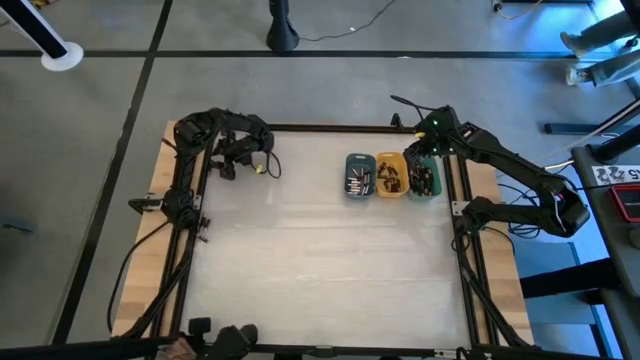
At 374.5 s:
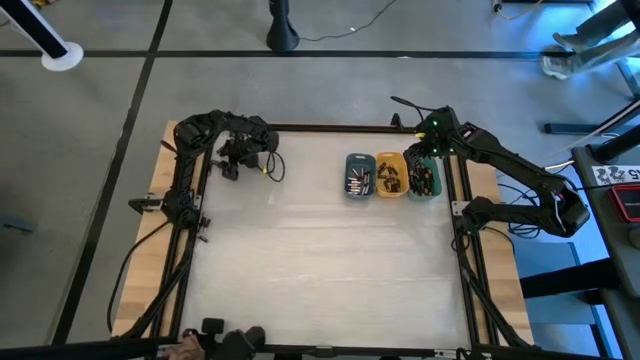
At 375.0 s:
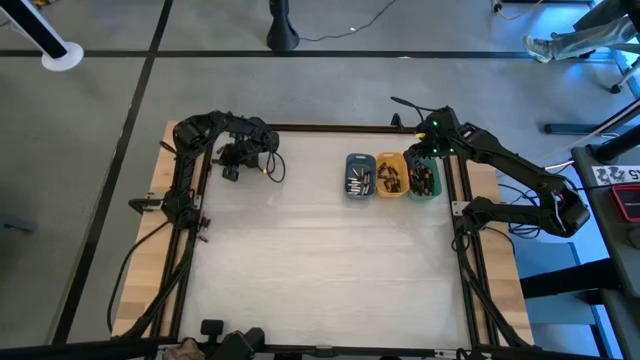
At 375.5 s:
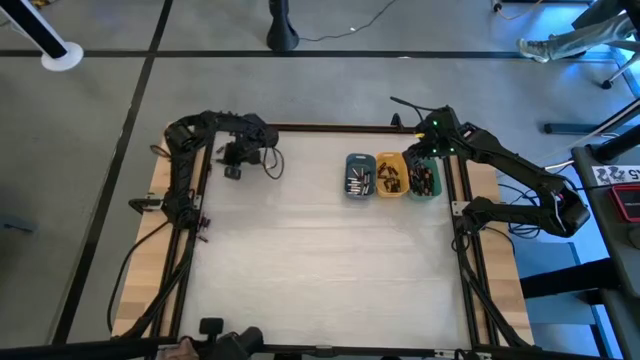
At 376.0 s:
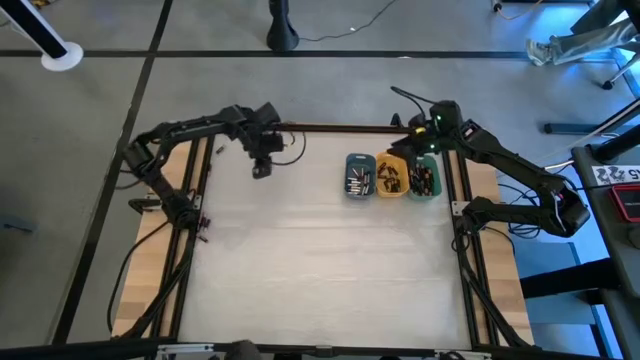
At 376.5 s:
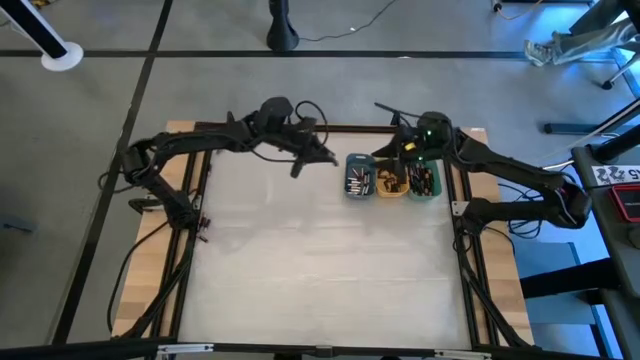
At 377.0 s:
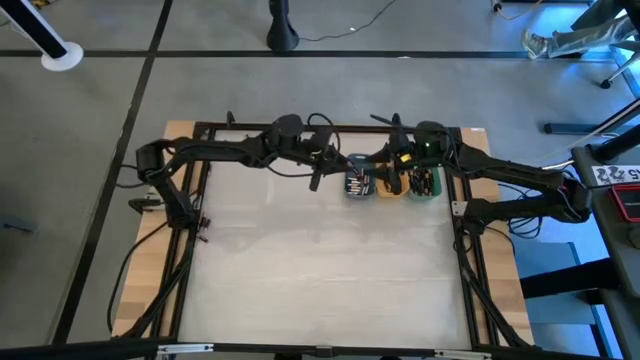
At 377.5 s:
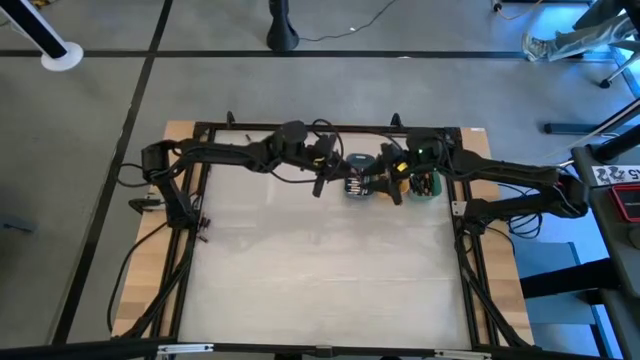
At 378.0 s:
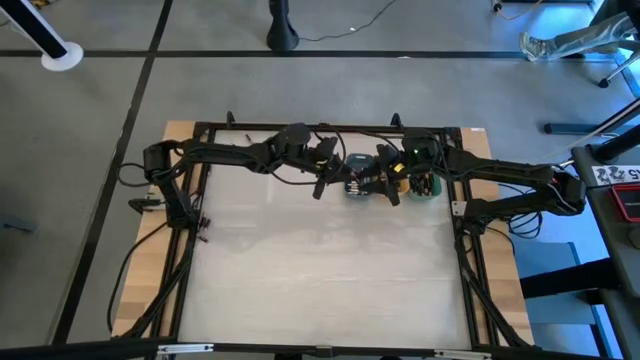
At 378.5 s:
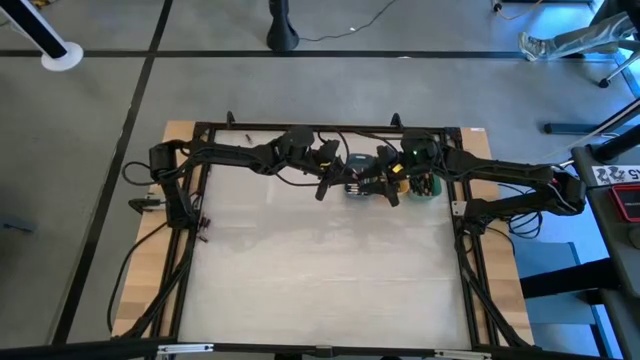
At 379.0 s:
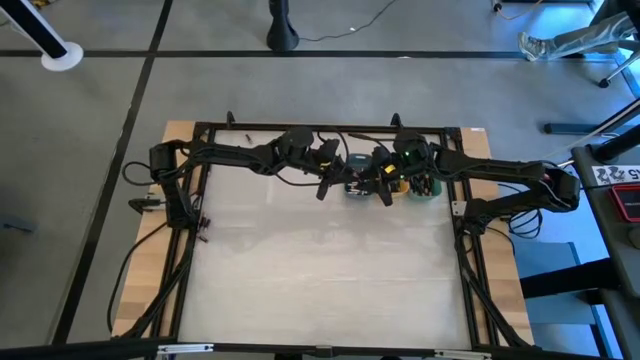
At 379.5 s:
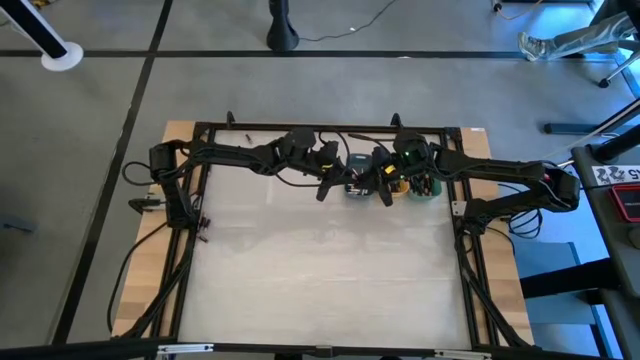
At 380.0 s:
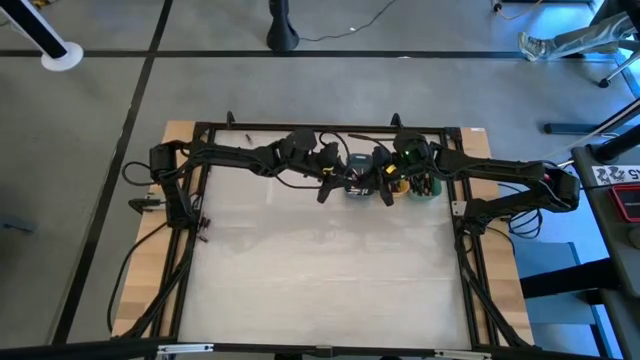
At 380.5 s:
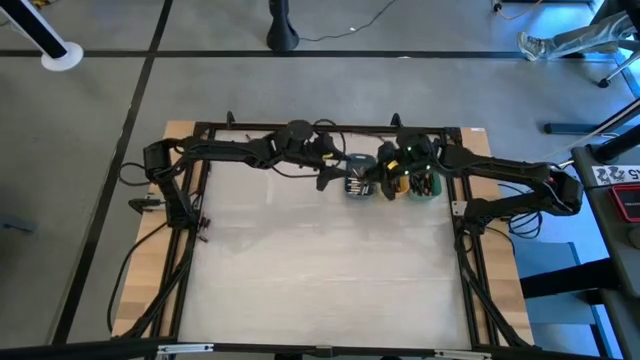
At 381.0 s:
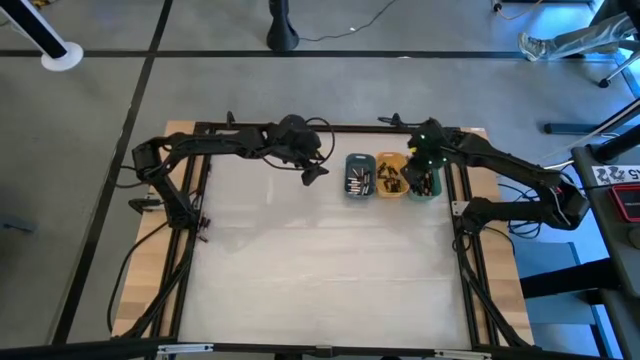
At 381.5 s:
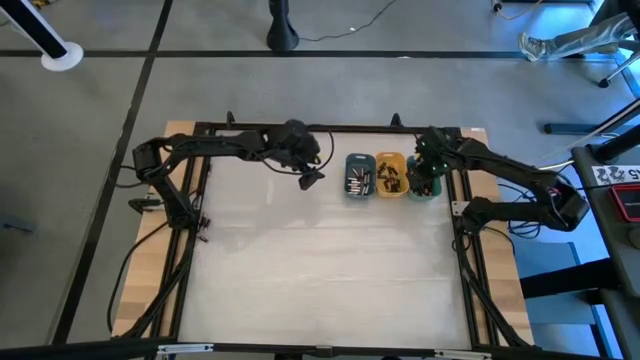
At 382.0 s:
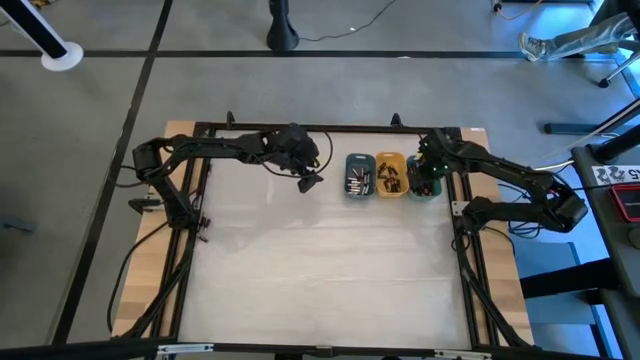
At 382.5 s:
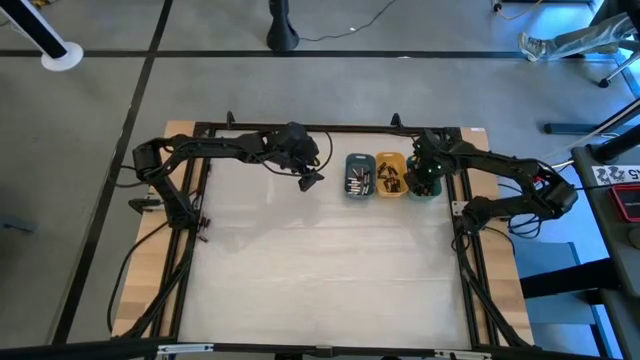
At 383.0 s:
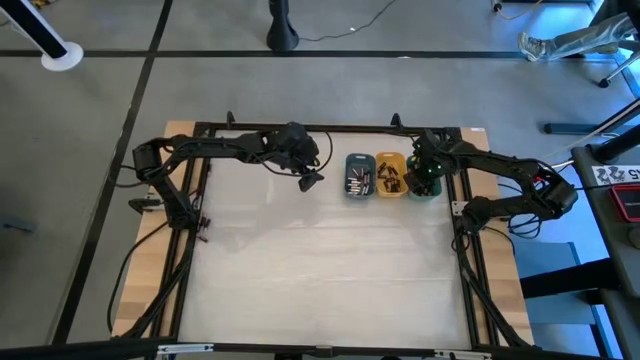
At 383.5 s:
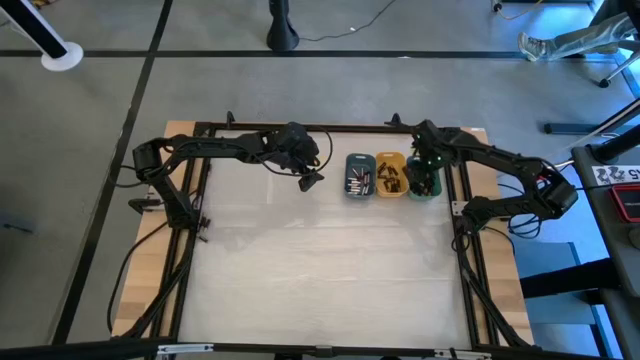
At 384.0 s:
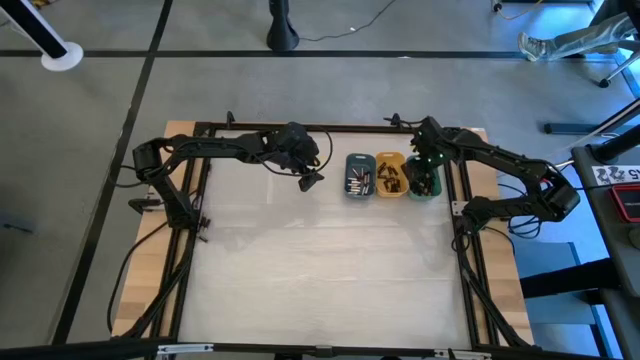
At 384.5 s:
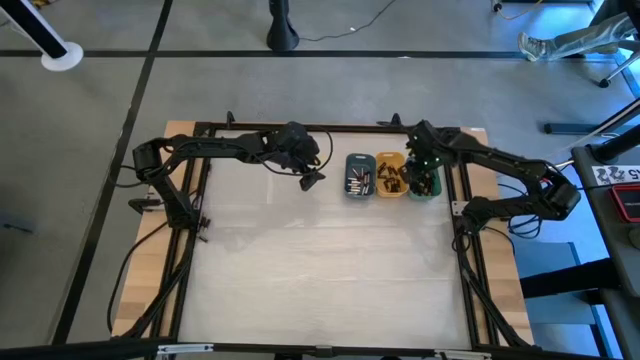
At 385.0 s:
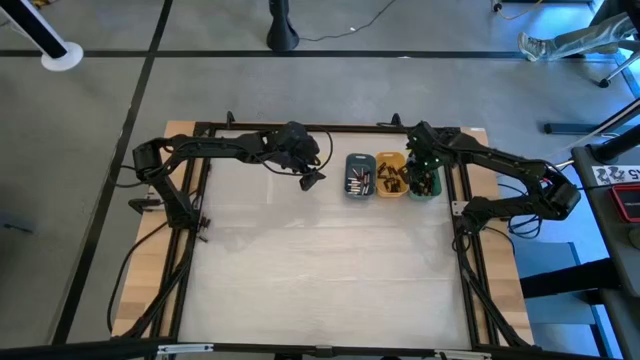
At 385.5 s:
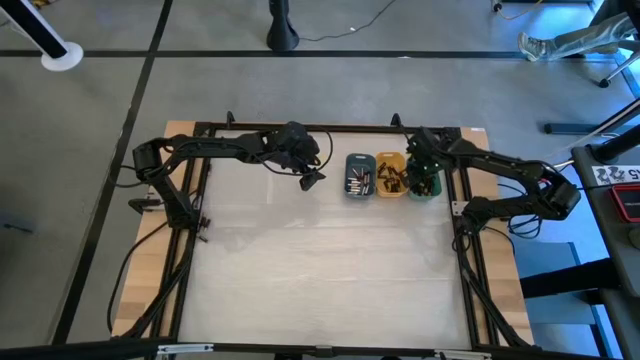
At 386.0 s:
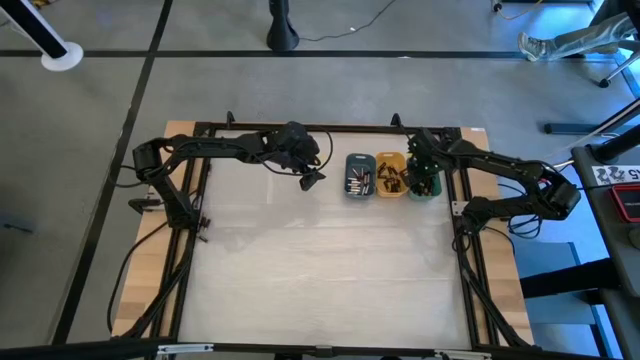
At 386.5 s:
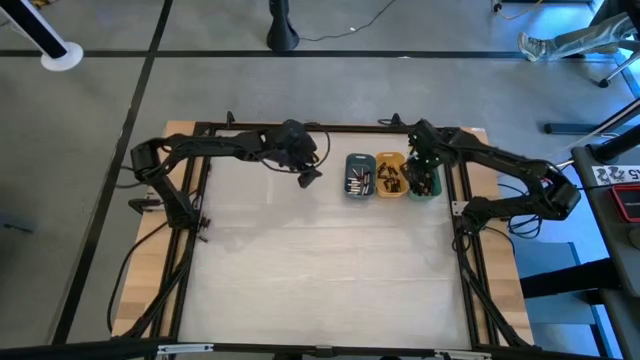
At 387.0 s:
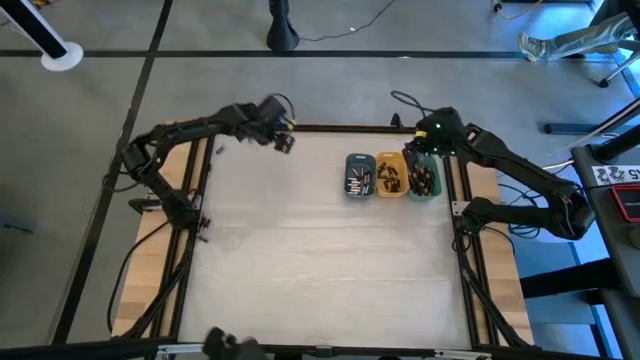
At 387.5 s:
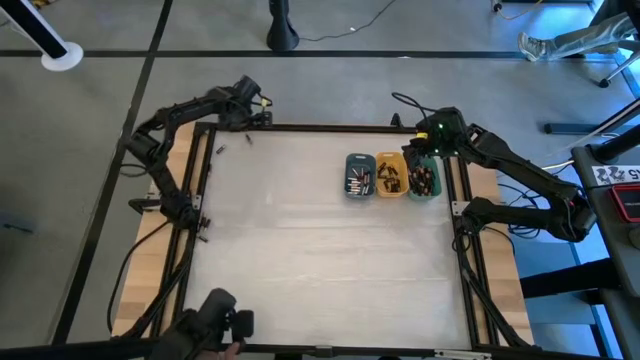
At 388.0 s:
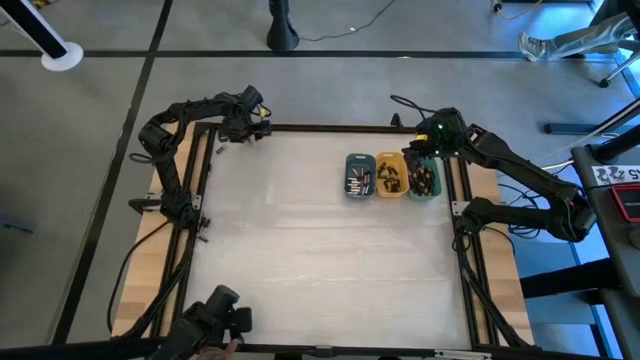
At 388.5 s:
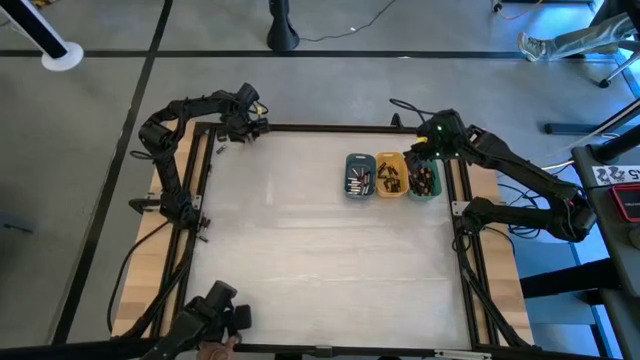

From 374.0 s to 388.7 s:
Task: Sort batteries
Put the black battery into the green bin

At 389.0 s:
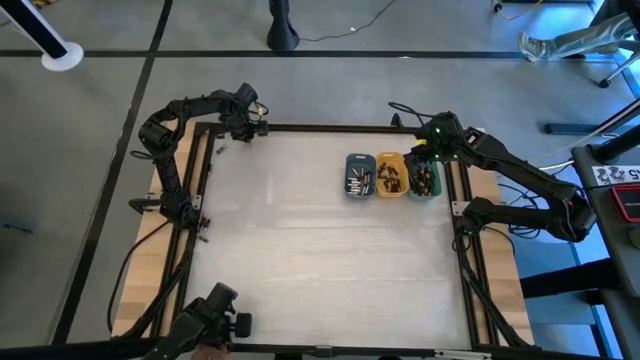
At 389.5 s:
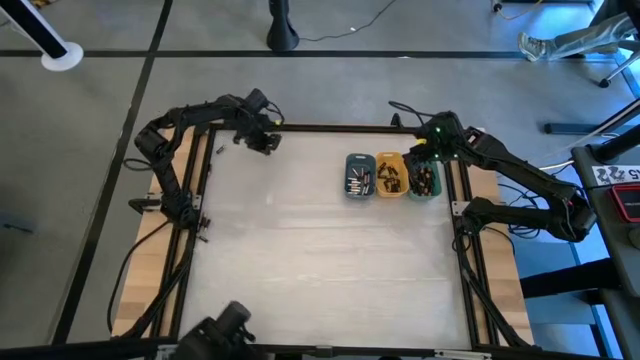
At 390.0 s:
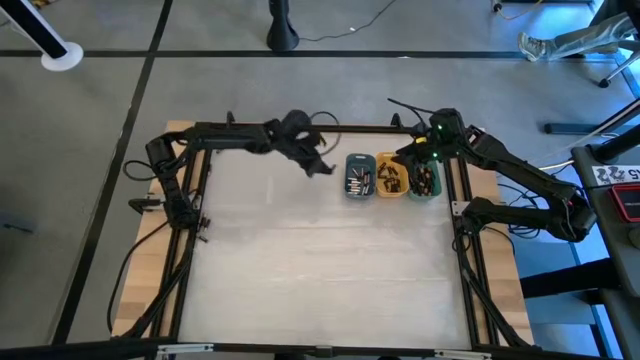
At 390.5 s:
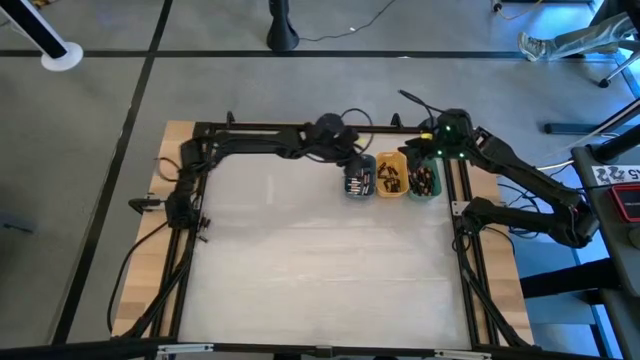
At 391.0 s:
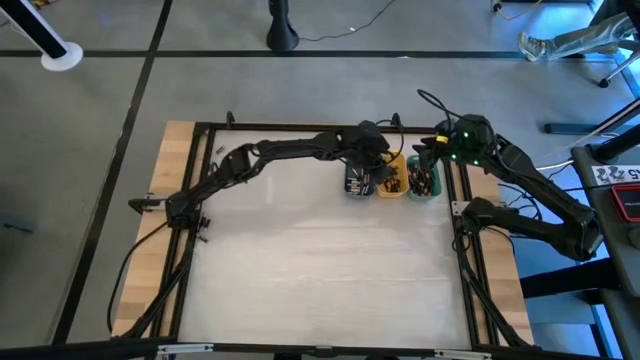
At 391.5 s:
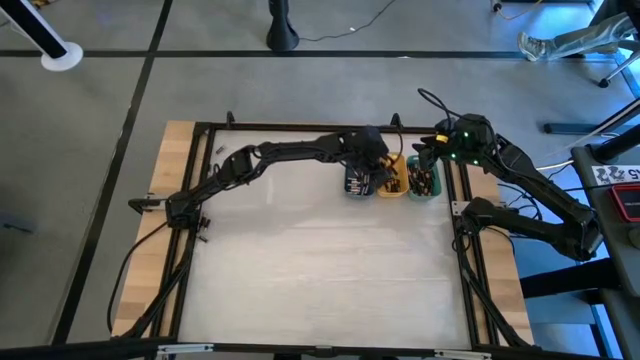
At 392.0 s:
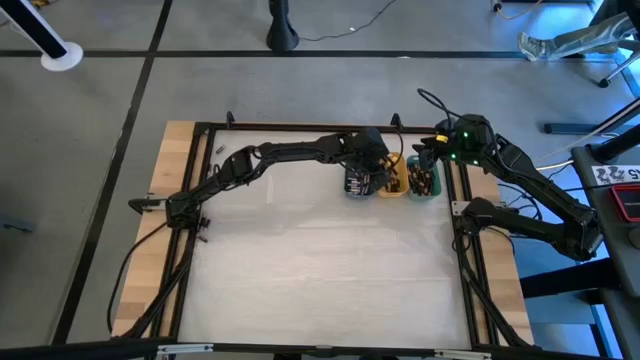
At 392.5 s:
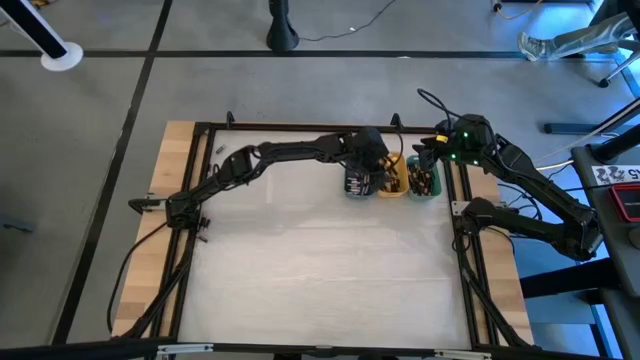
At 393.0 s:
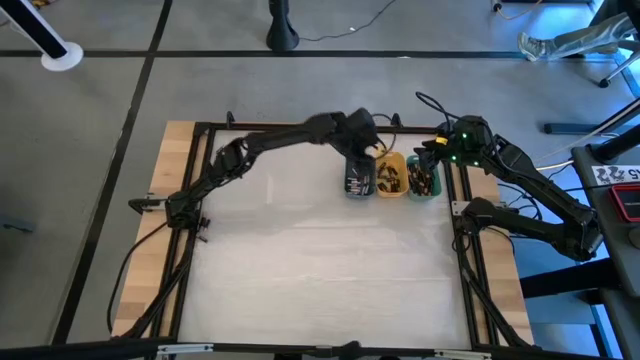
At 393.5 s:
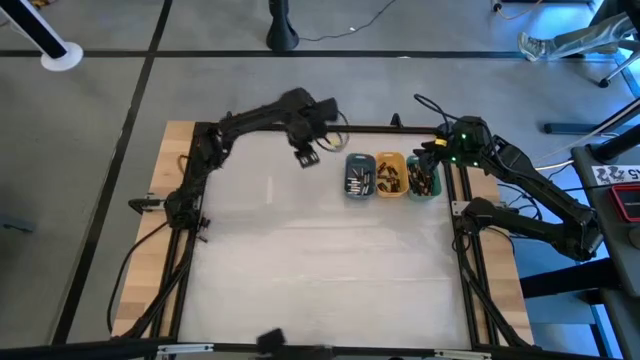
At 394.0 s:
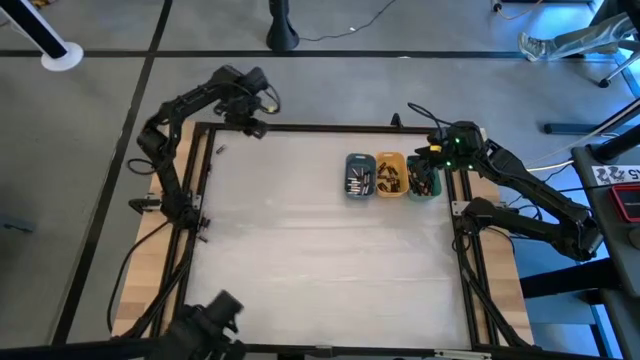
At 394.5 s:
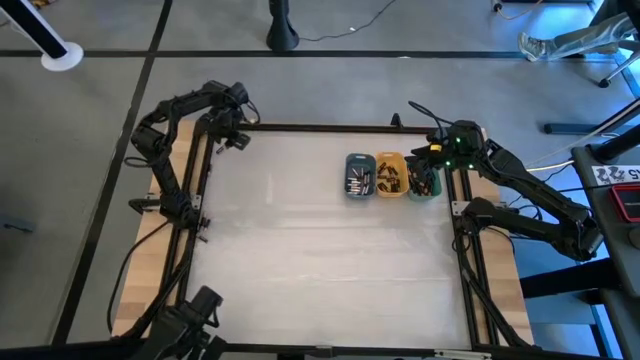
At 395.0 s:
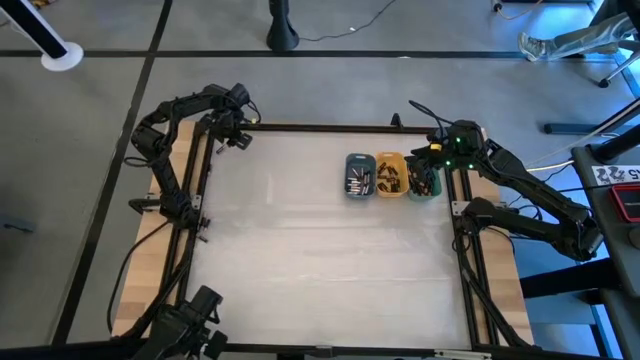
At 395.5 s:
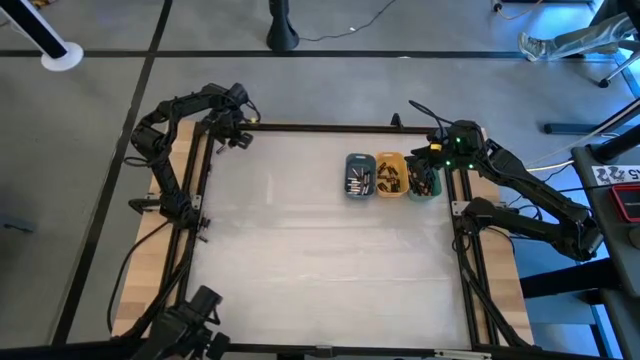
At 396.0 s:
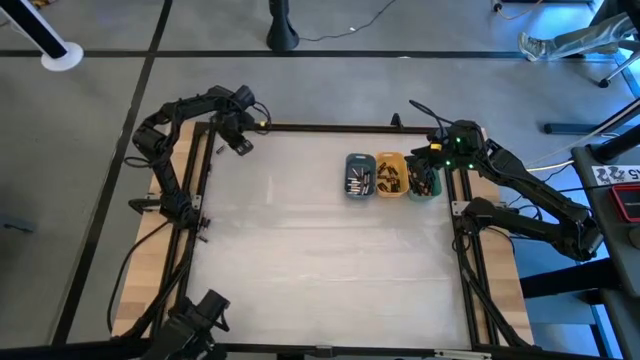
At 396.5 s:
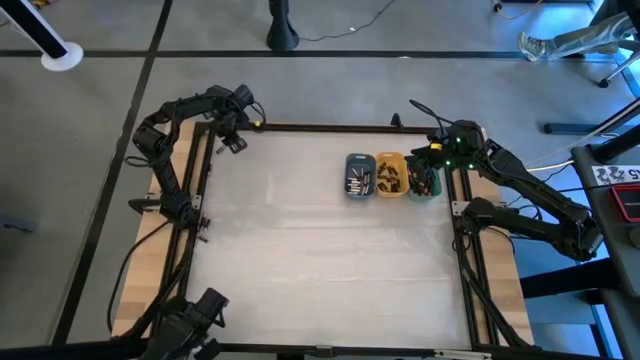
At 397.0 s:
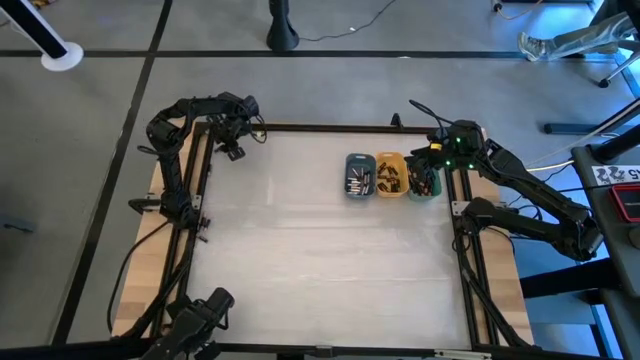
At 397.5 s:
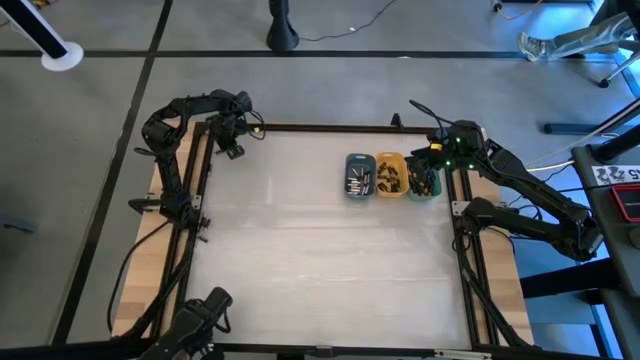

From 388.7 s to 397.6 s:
Put the black battery into the yellow bin
